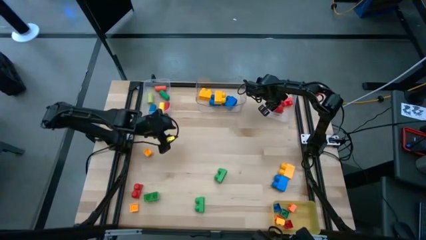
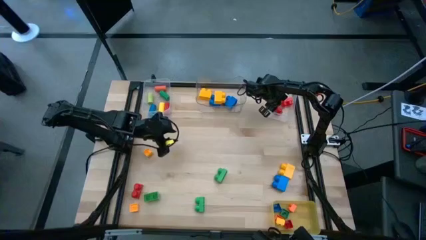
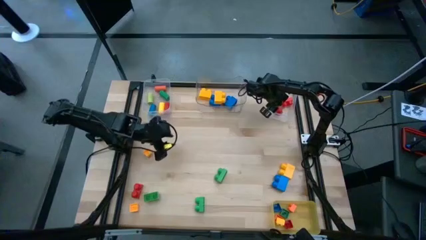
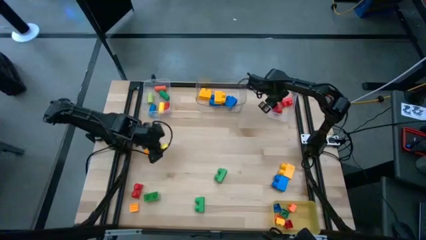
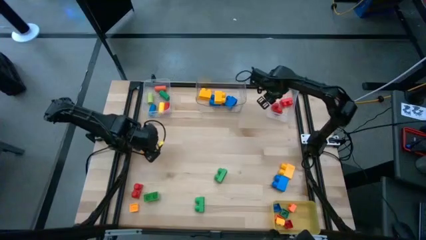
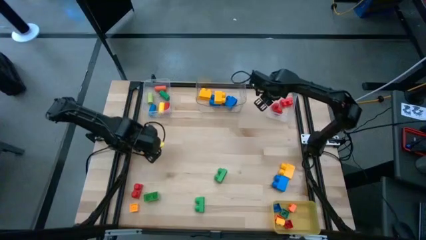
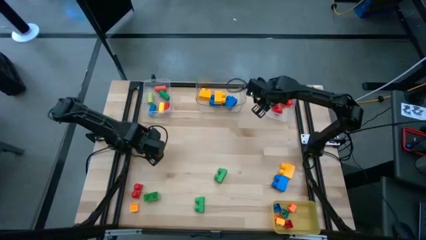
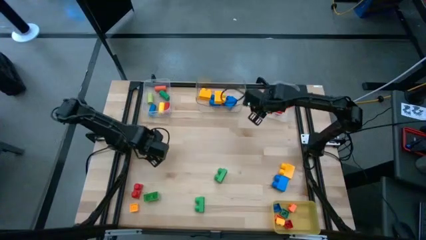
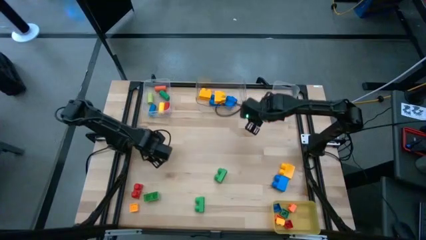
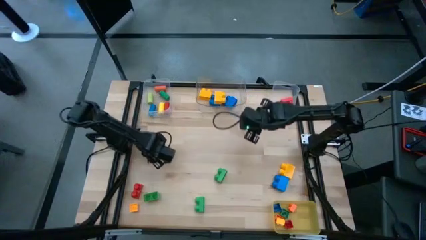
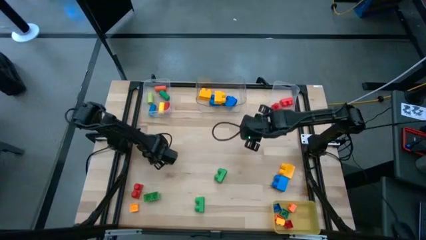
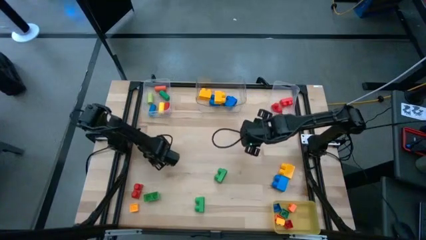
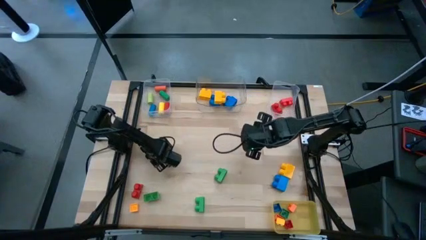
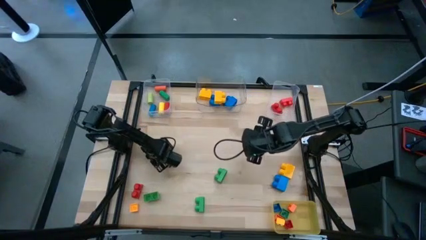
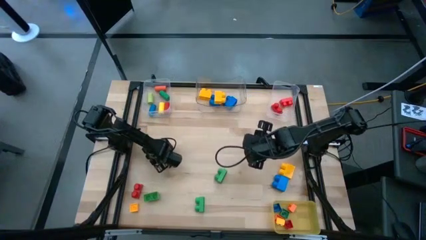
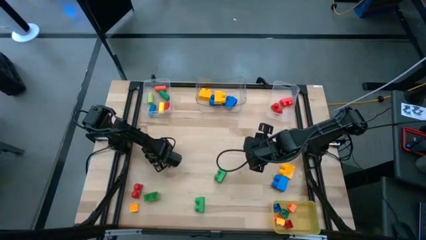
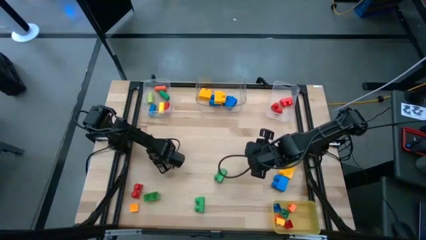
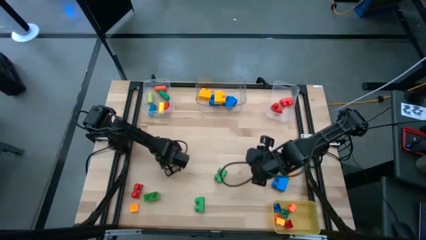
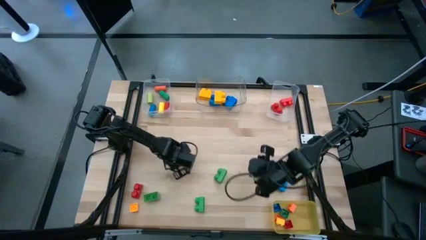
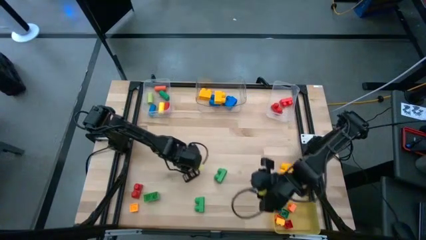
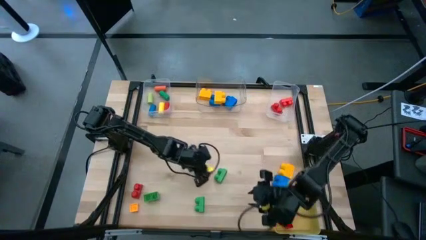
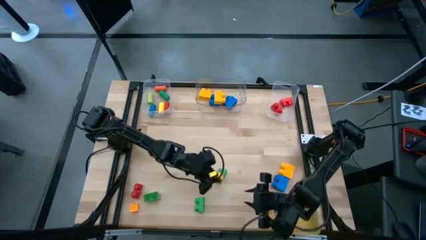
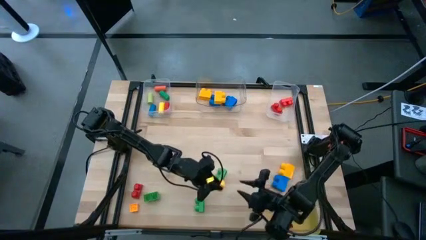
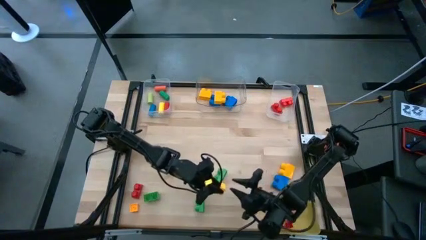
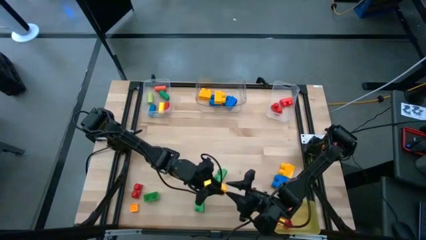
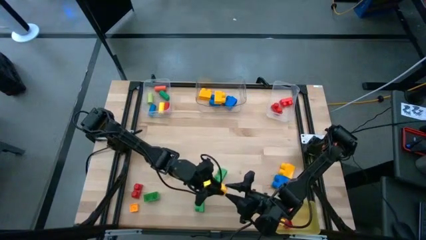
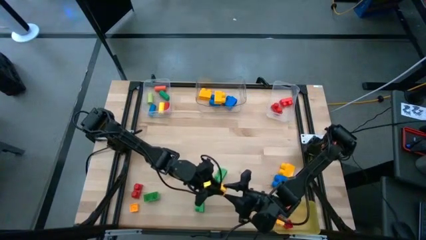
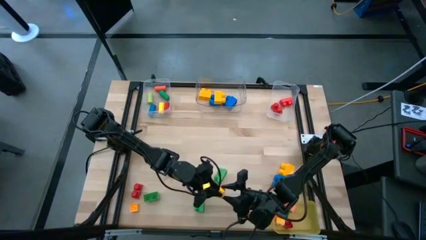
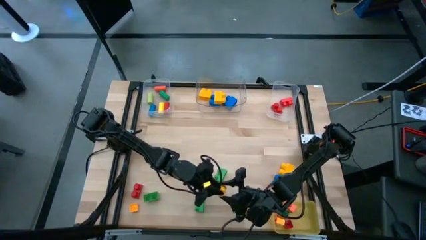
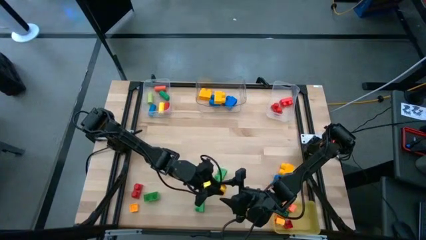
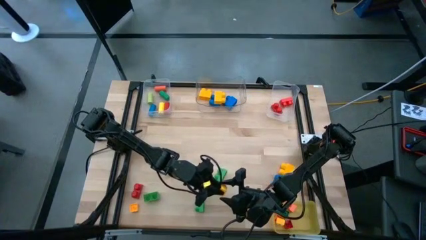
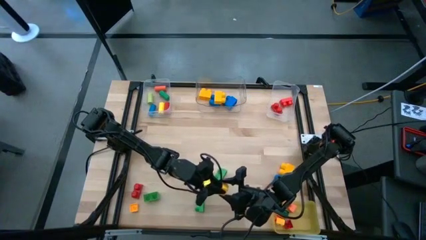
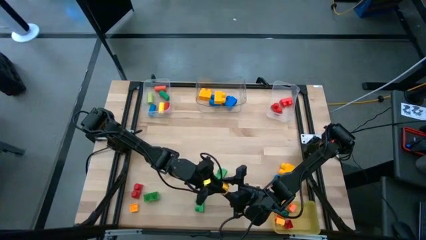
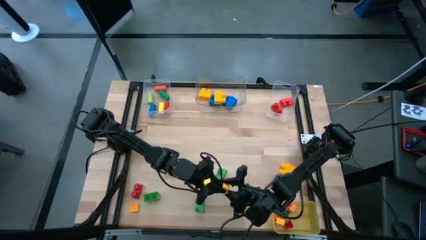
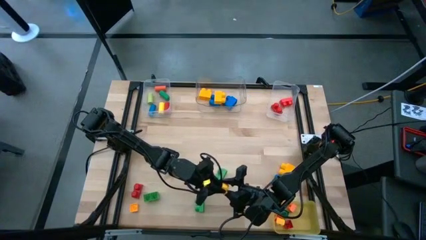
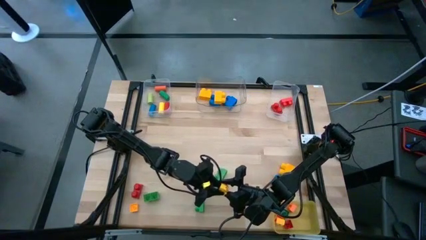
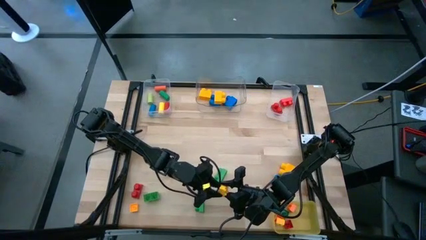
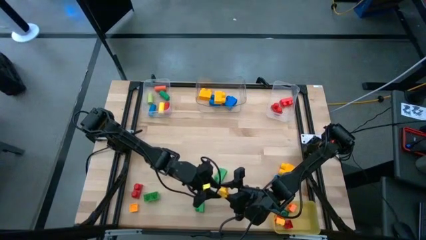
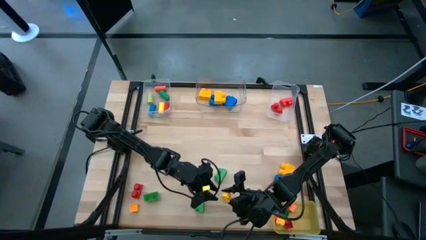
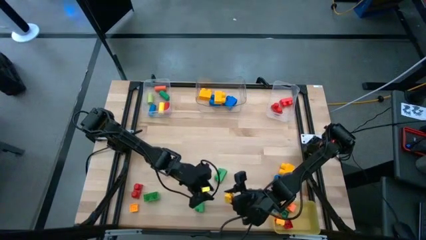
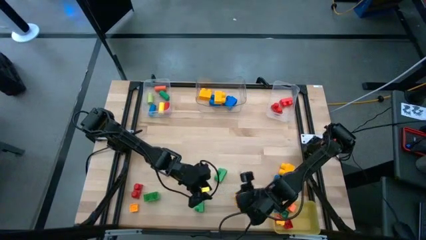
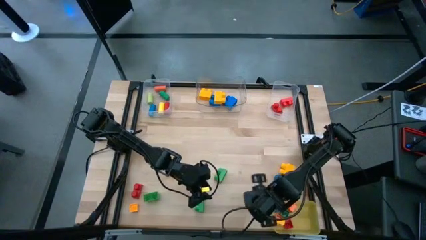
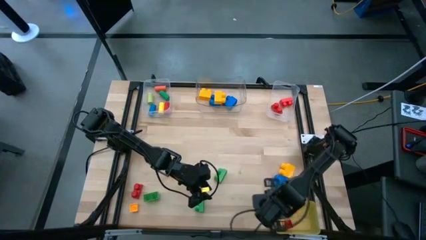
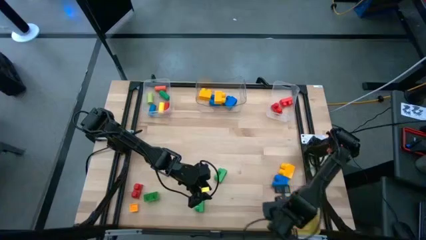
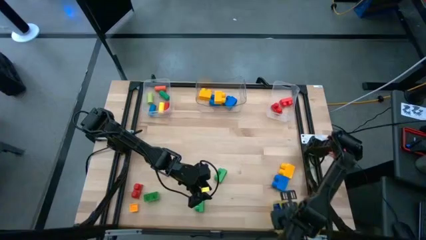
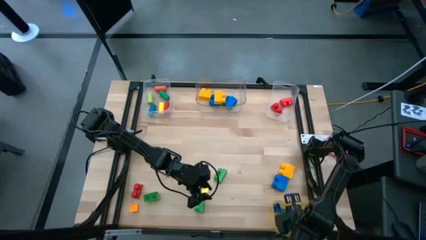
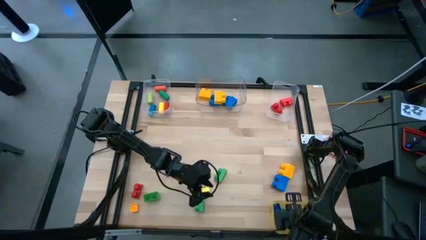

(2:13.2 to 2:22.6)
Task: Sort blocks by size
Put the small yellow game piece into the yellow bin

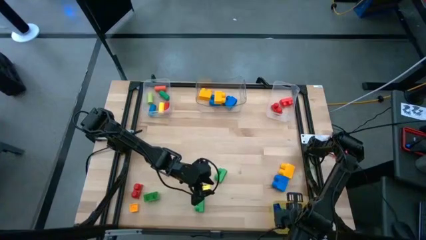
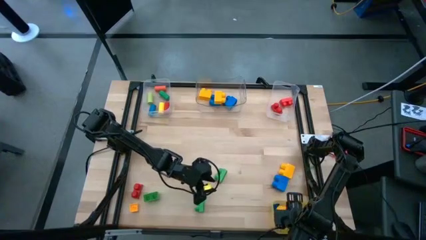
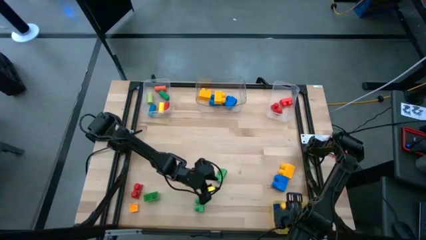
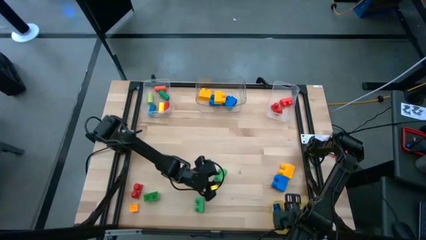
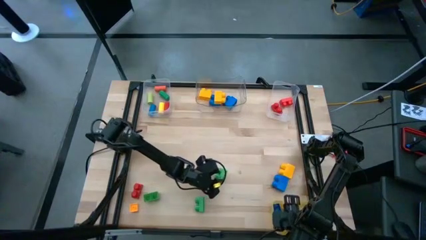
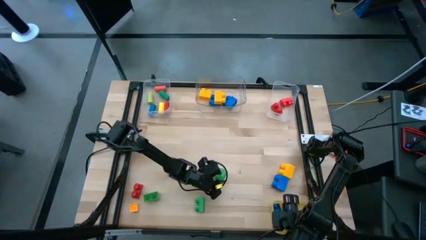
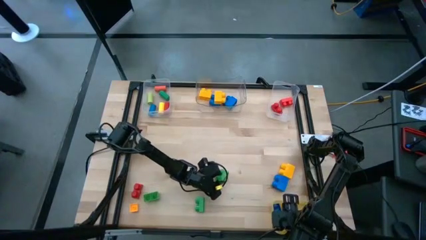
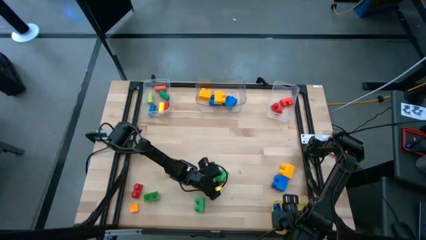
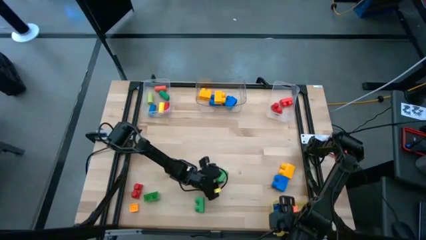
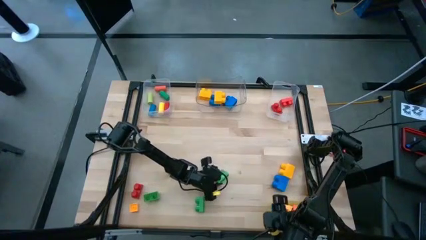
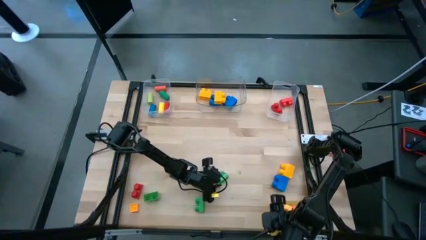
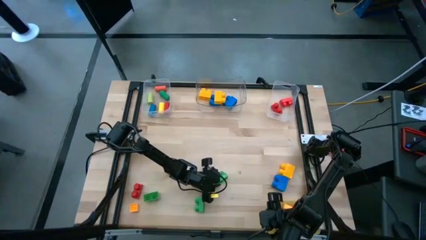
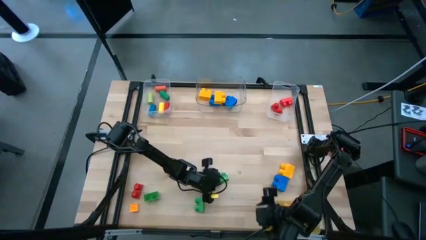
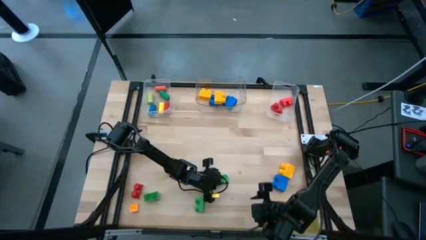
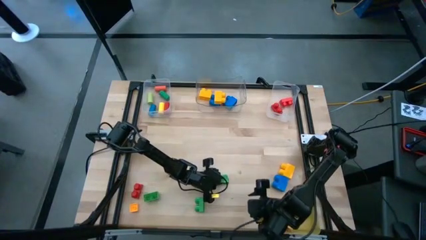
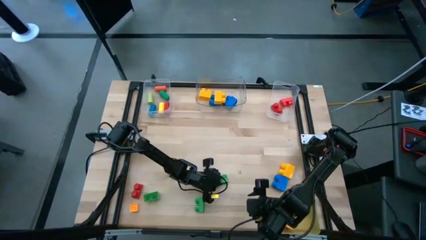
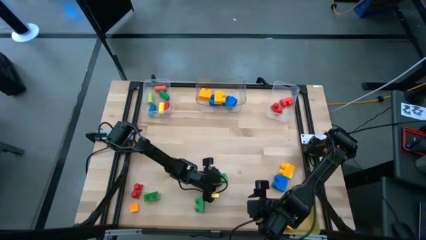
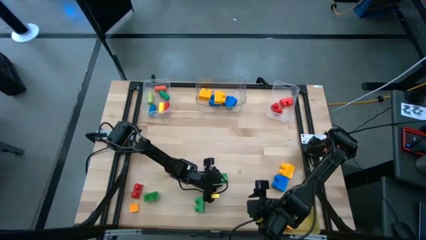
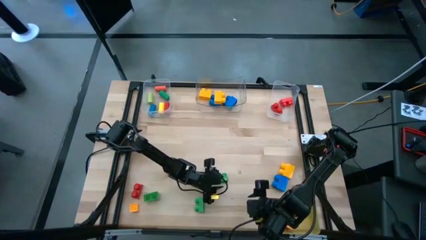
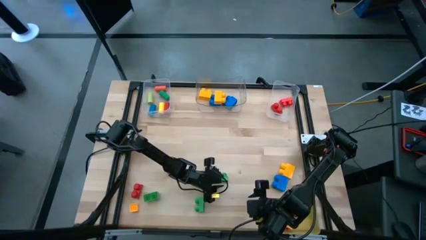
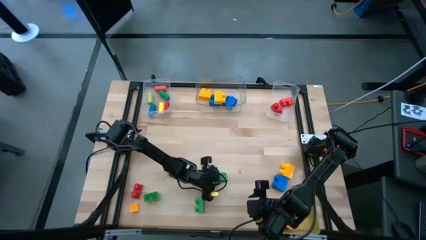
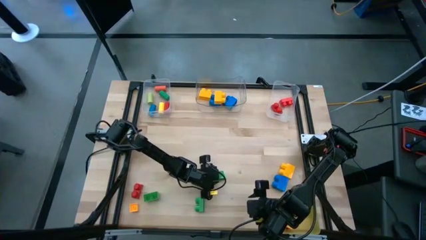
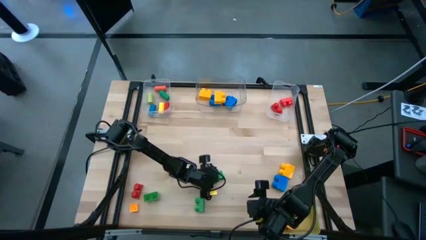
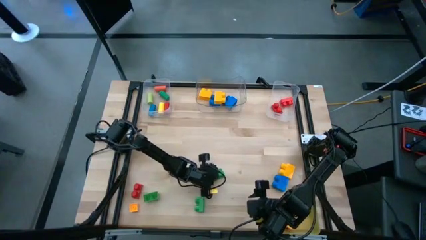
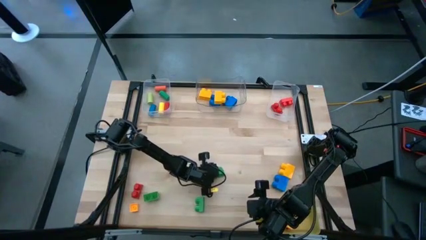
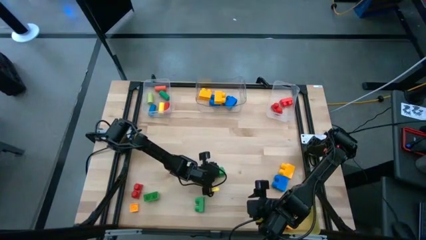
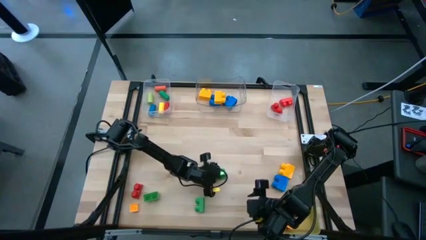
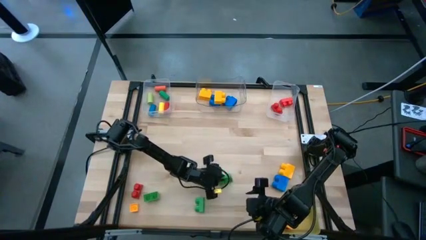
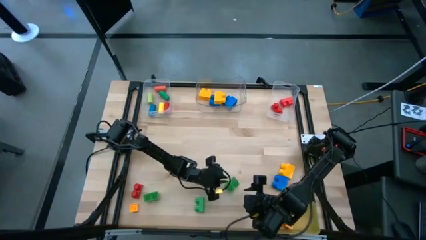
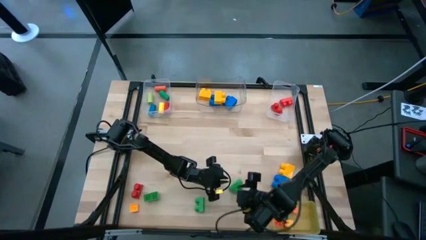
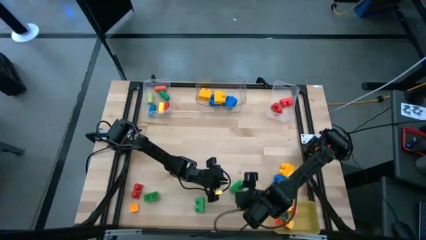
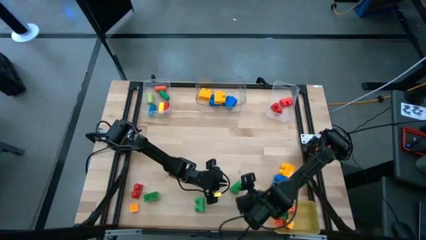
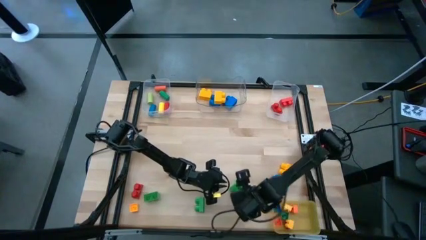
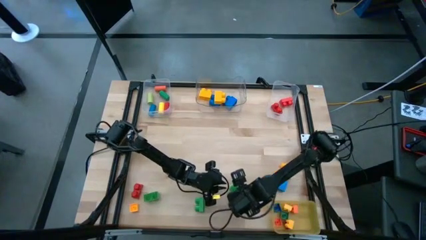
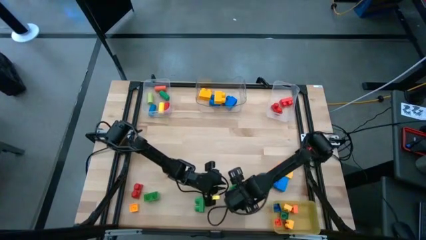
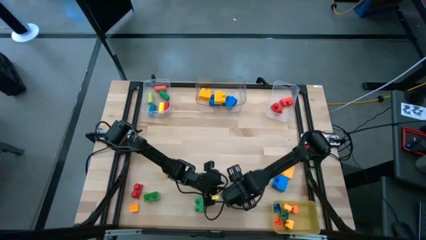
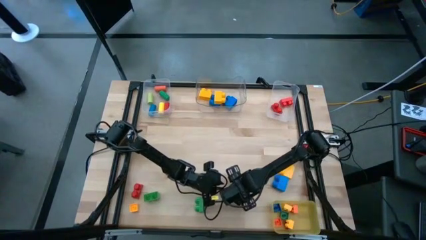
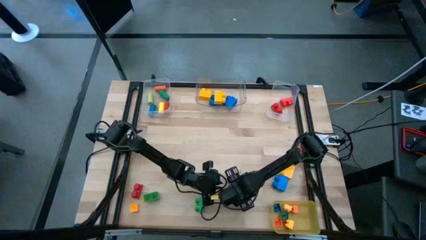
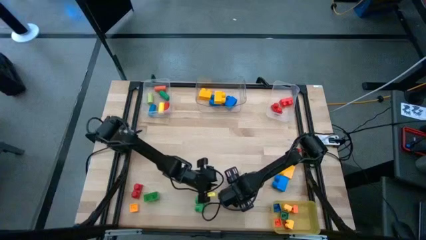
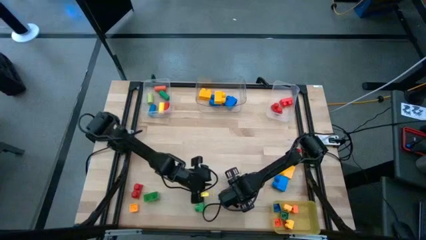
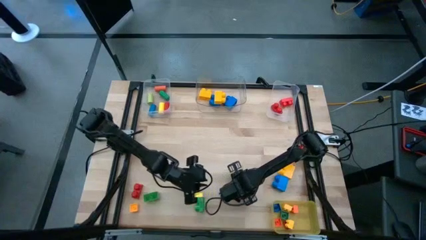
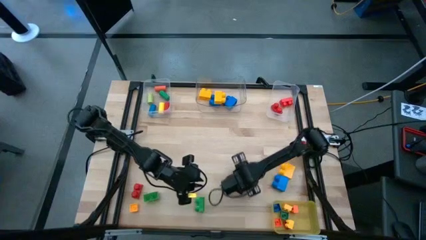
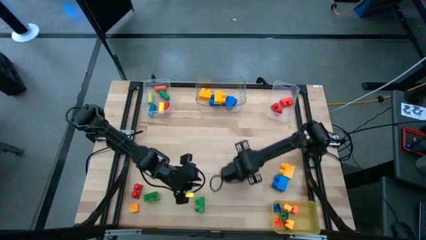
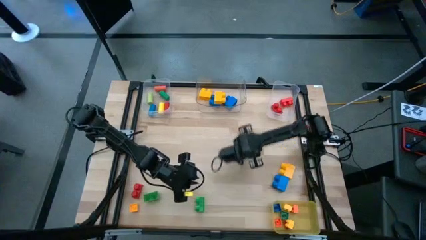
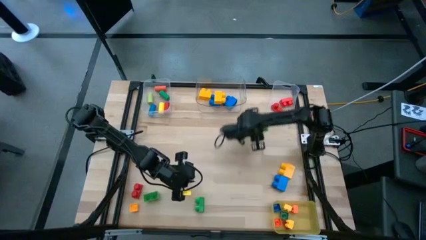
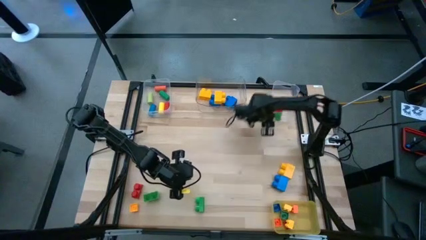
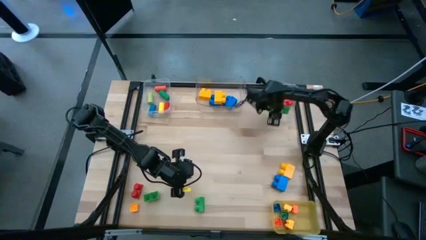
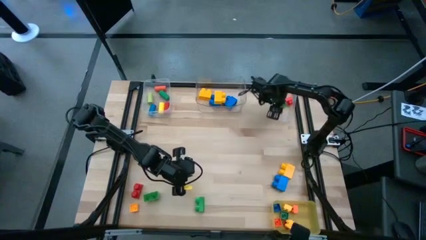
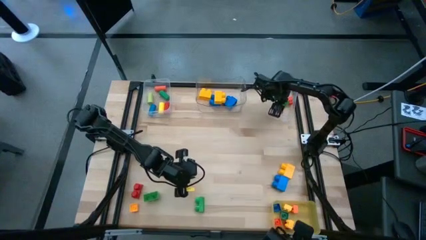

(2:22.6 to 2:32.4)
Put the medium green game piece into the right transparent bin
